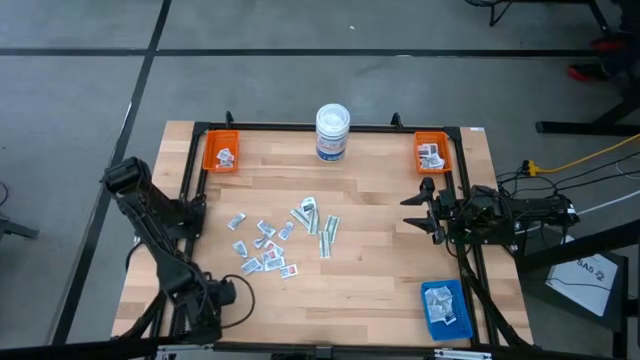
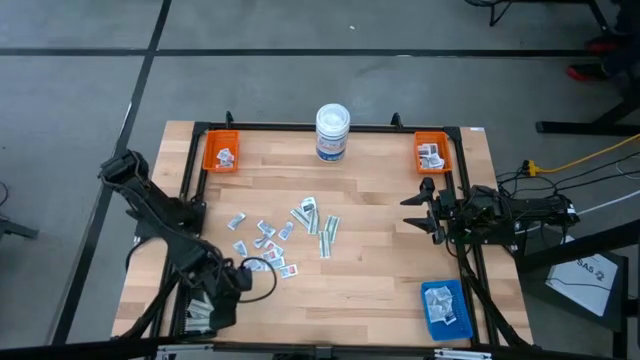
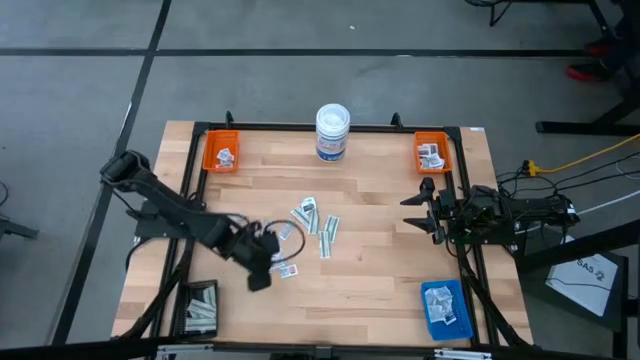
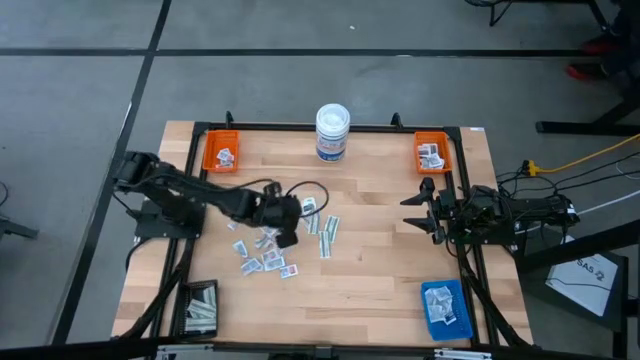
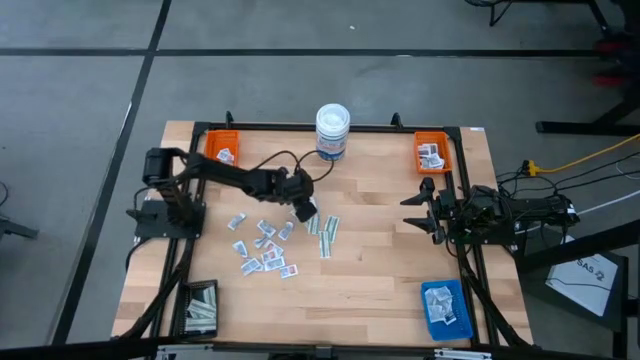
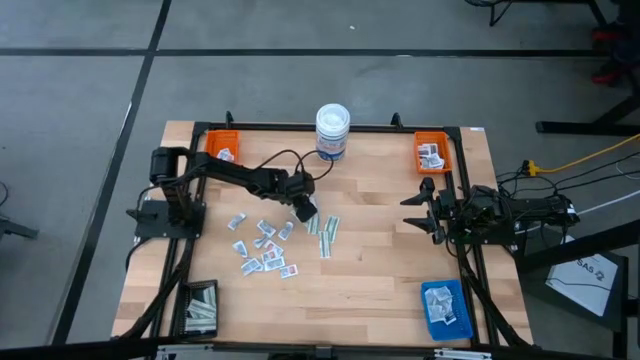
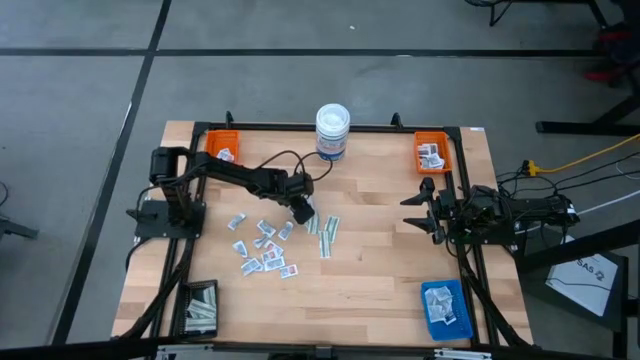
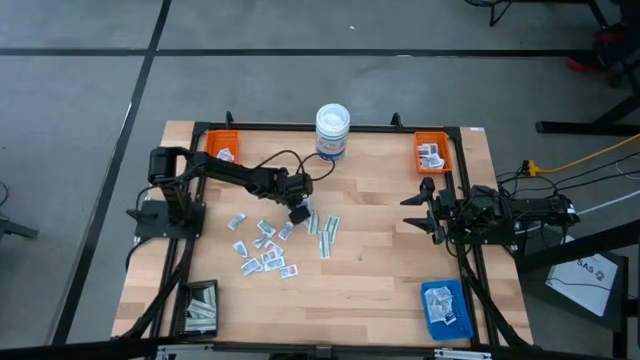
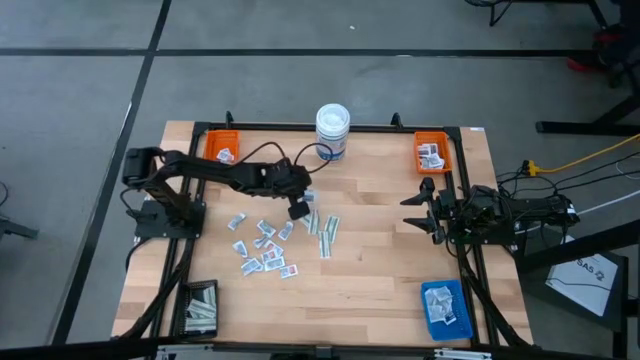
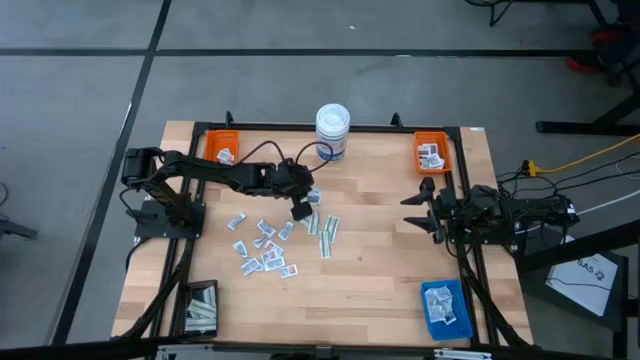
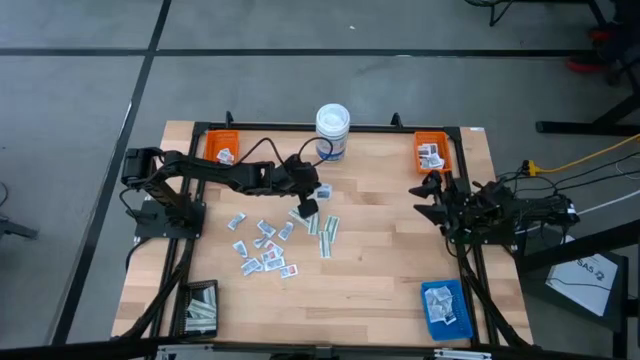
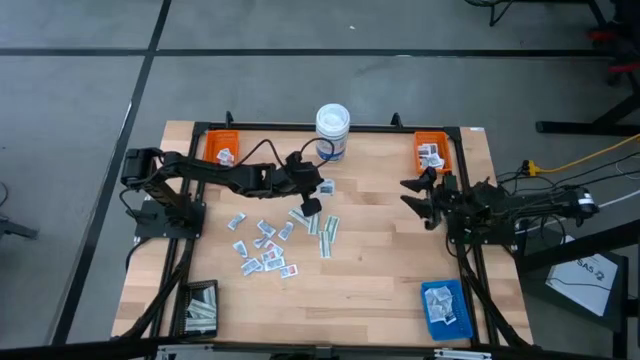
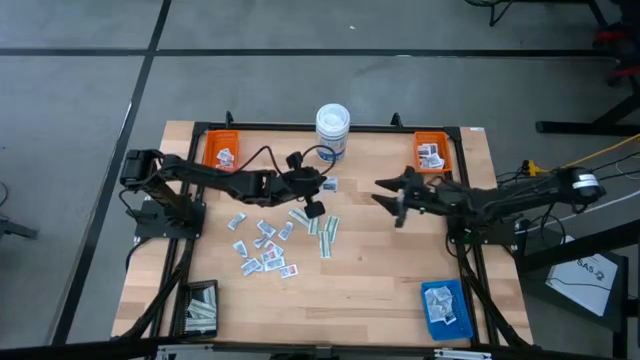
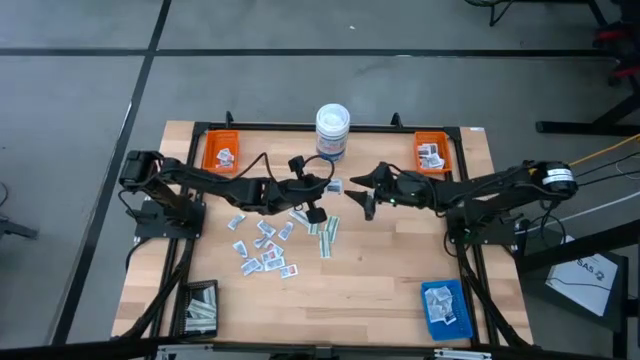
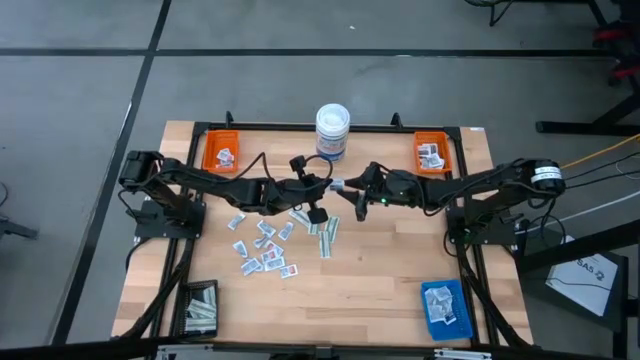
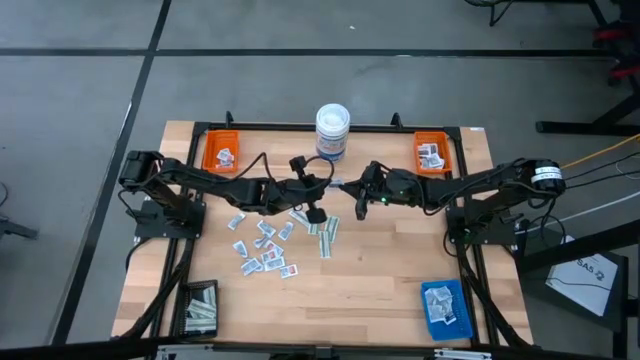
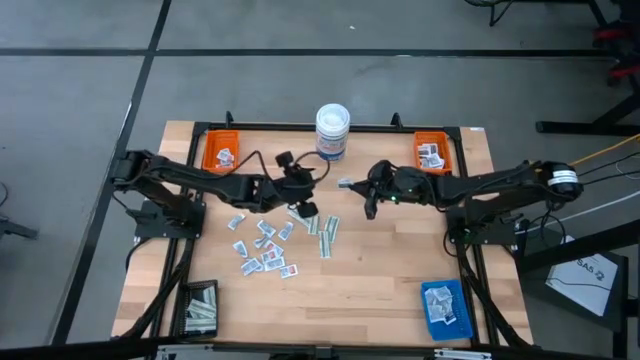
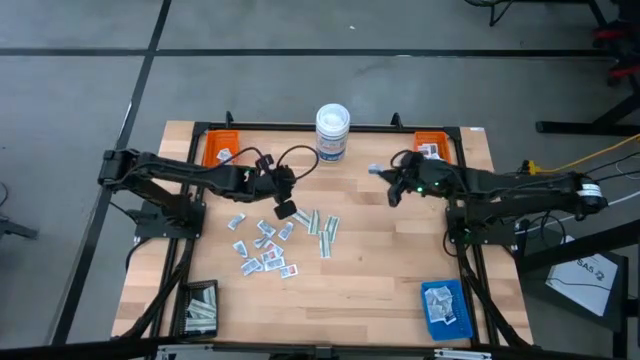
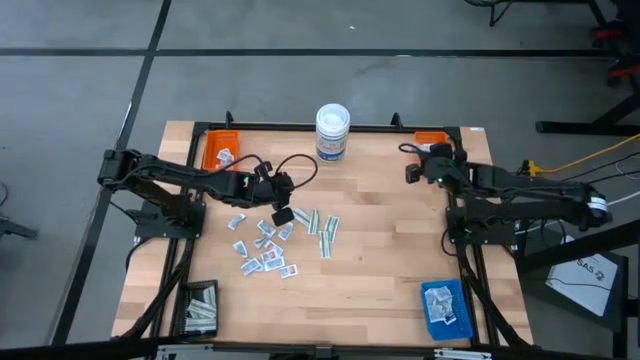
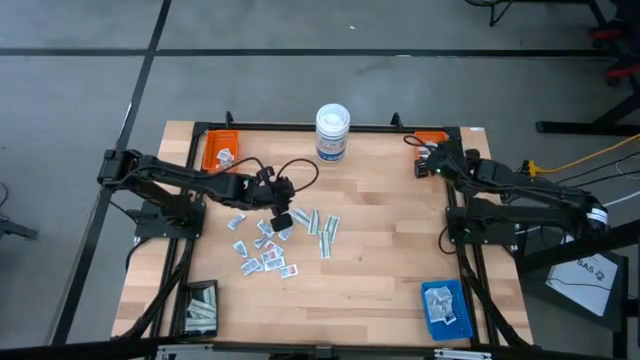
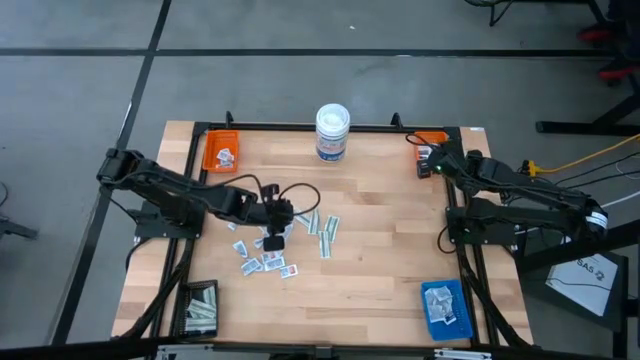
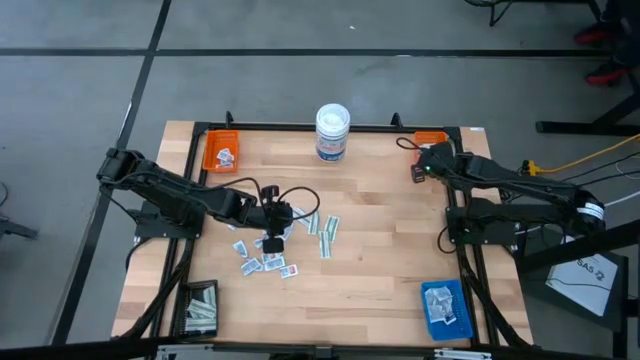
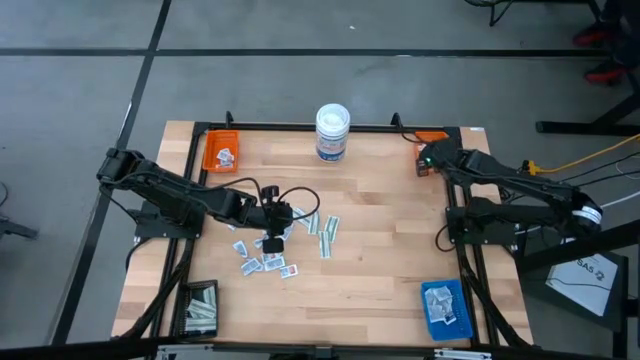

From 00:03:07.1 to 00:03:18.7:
Task: Pick & Place First Aid Supplies
Put the gray towelette pack into the right orange bin

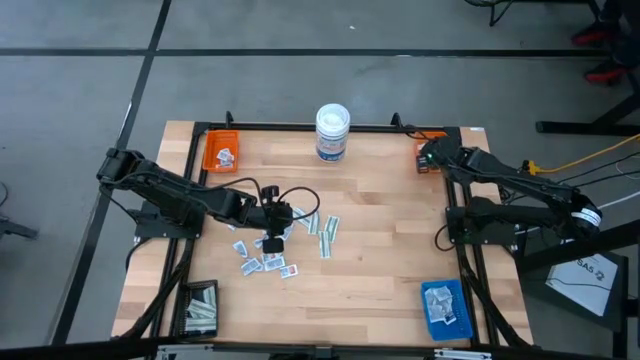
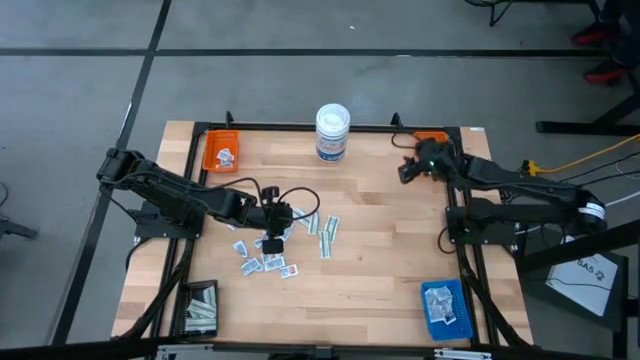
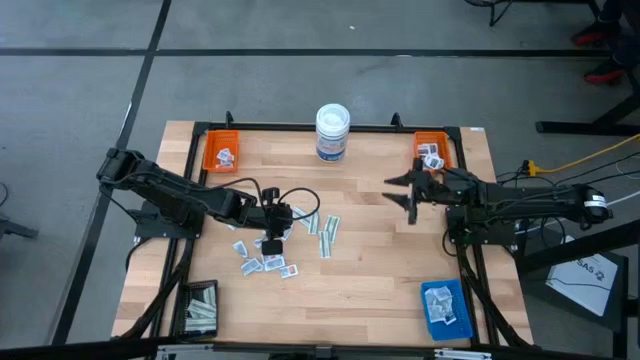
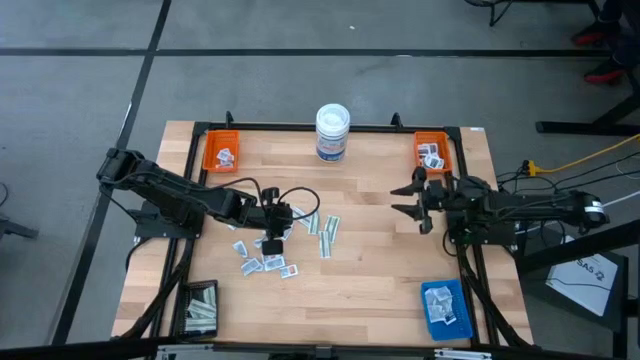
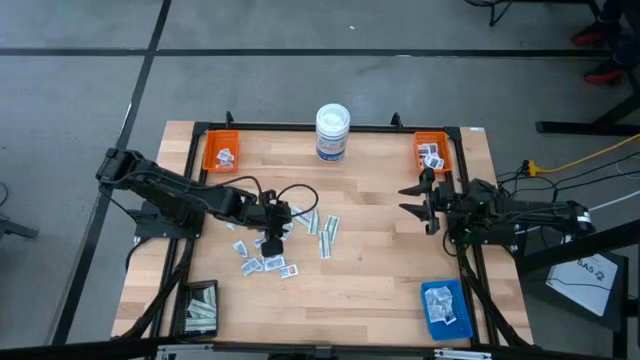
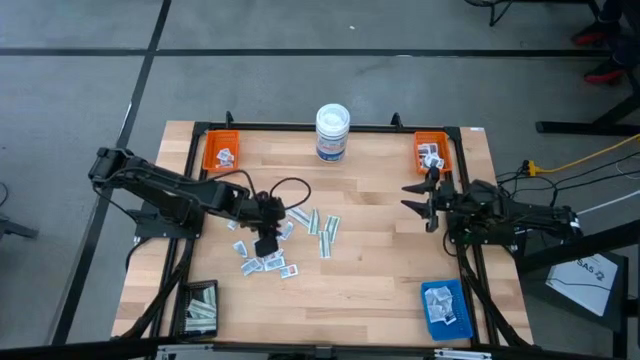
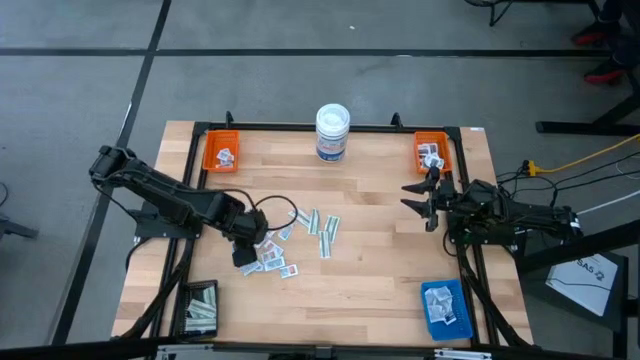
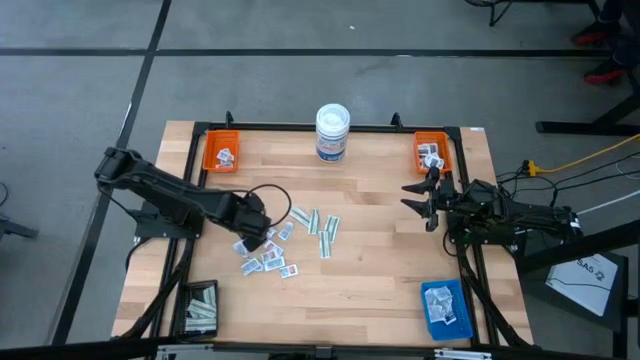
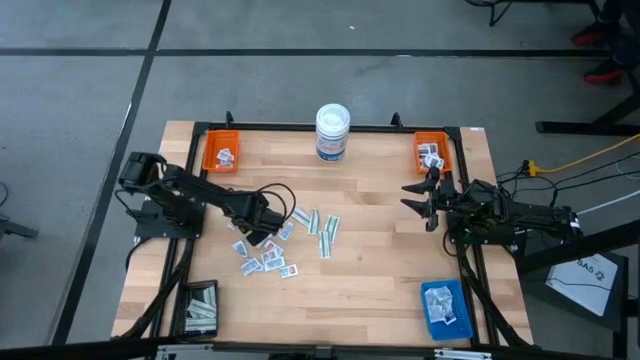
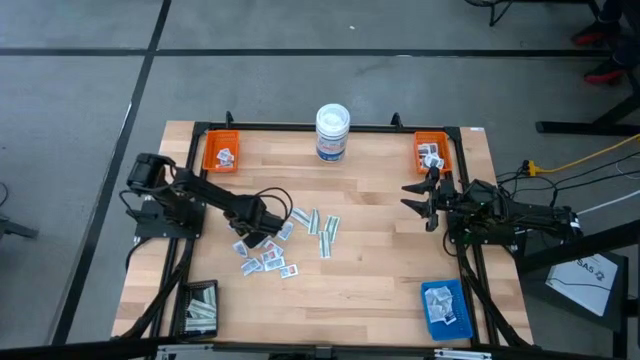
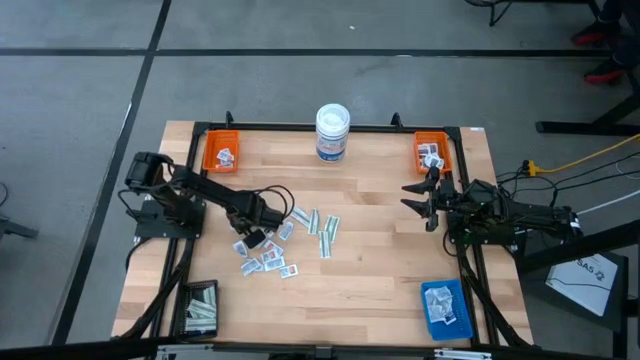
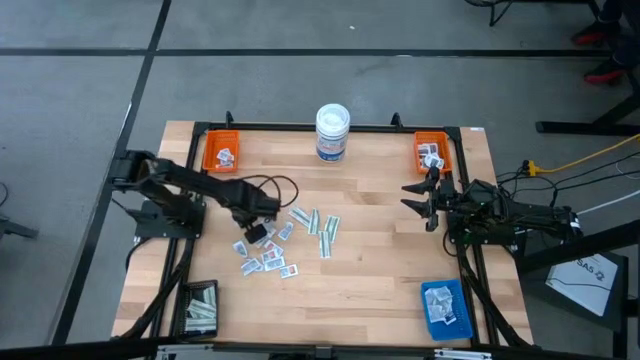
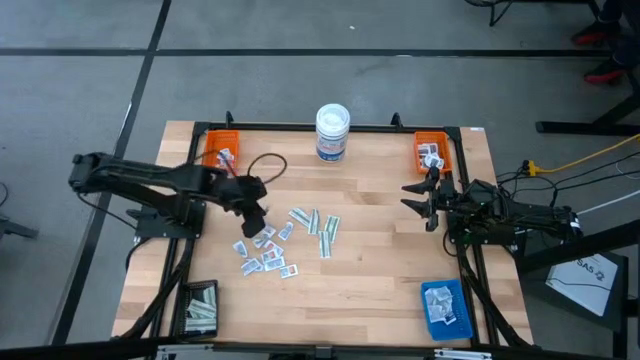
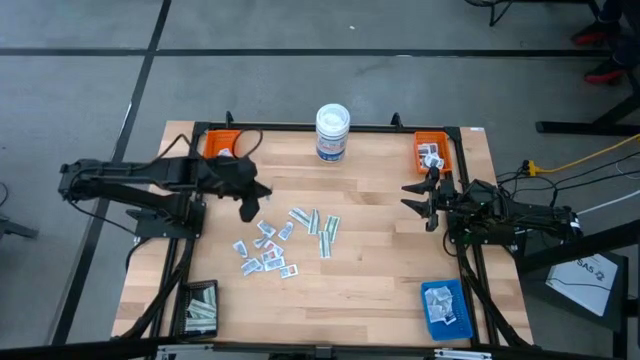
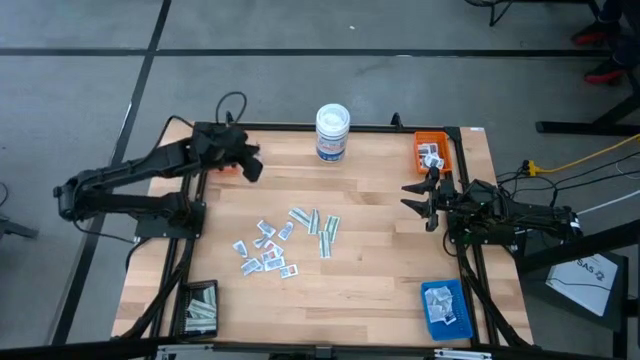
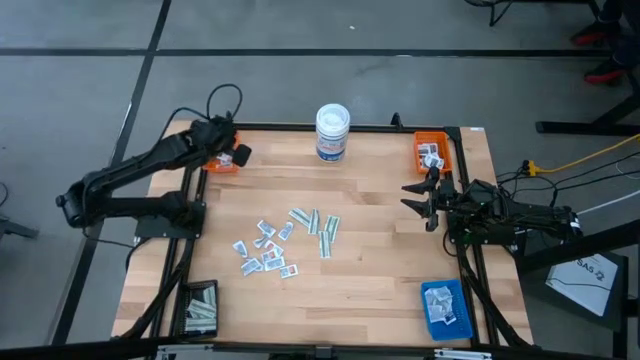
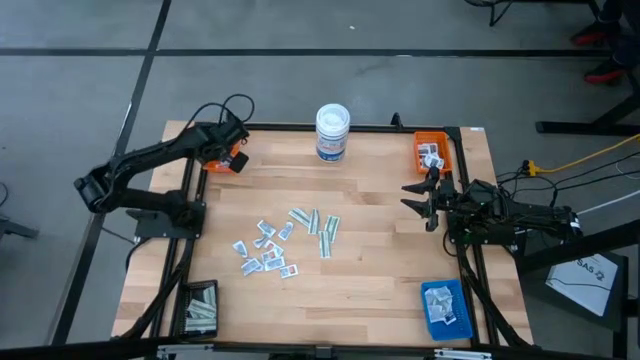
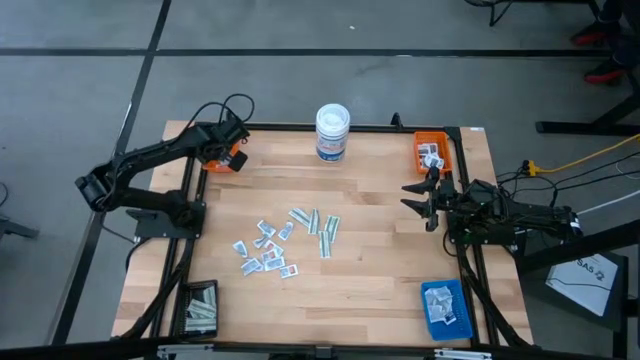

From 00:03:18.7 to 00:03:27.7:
Put the orange ointment pack into the left orange bin

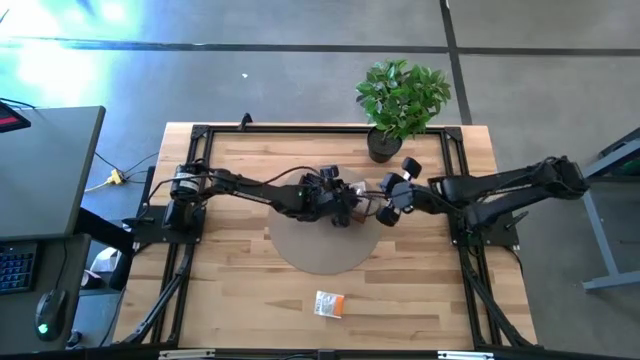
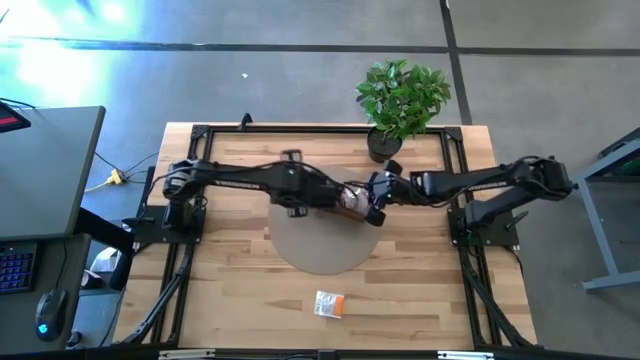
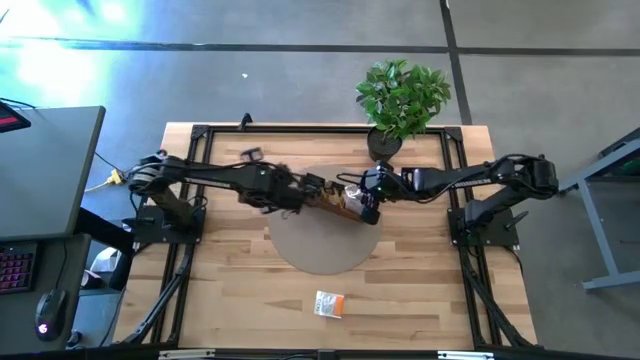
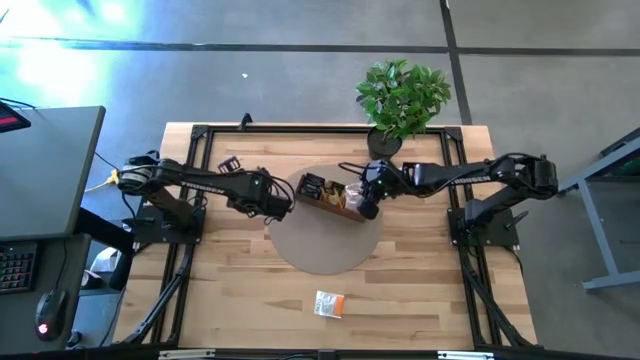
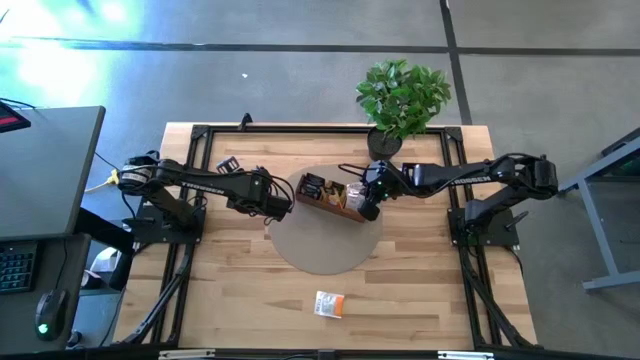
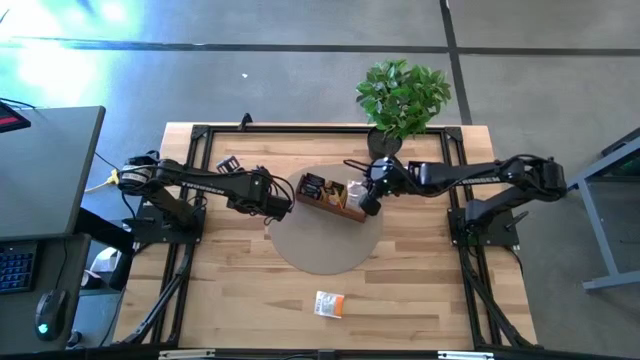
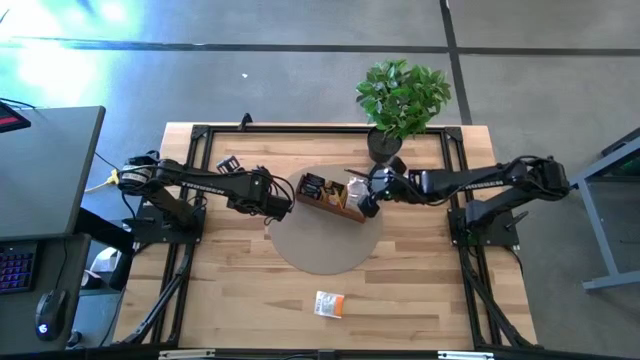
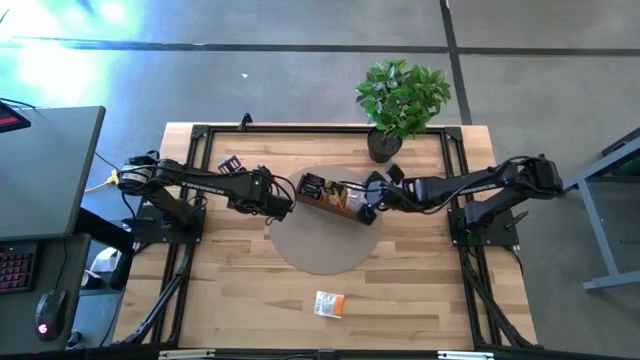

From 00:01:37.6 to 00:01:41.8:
Task: Pick & Place Tea
Adjust the white tea bag on the wooden organizer
